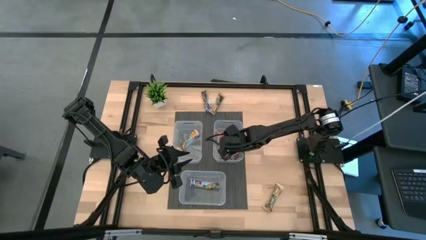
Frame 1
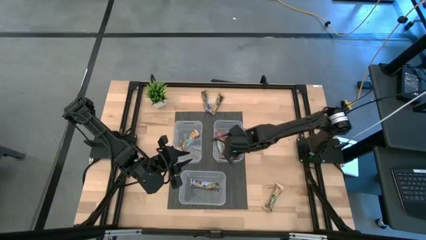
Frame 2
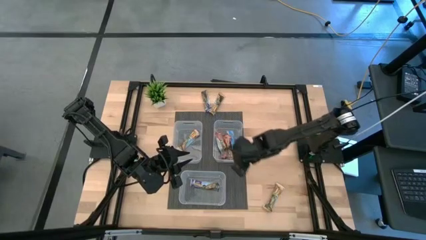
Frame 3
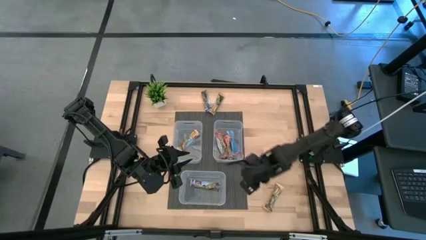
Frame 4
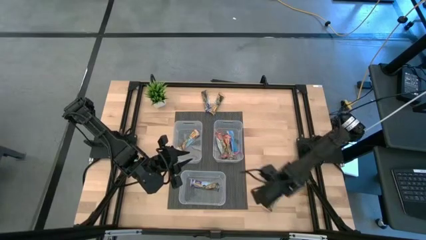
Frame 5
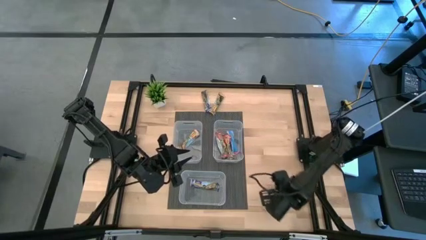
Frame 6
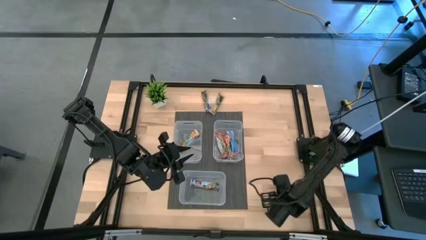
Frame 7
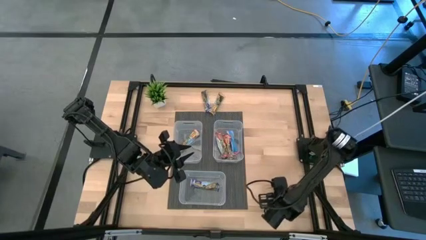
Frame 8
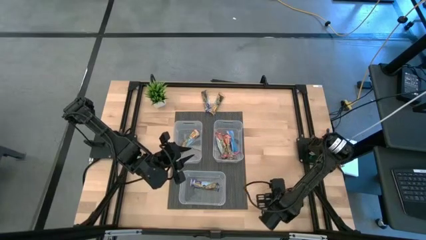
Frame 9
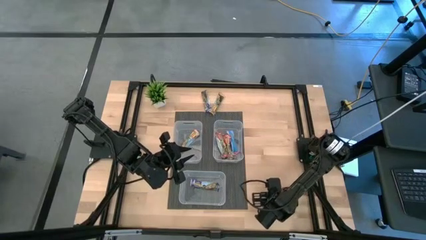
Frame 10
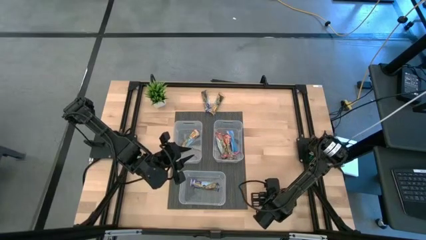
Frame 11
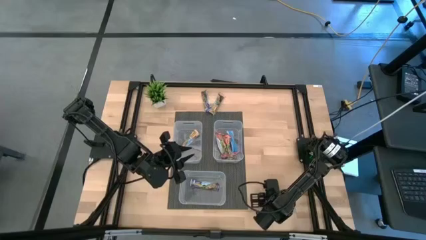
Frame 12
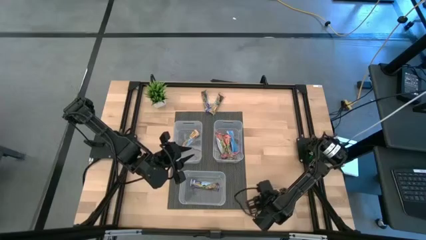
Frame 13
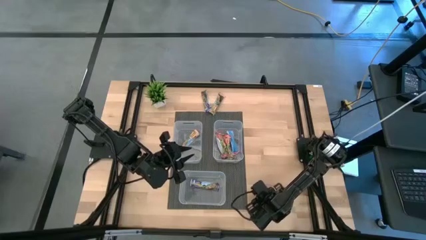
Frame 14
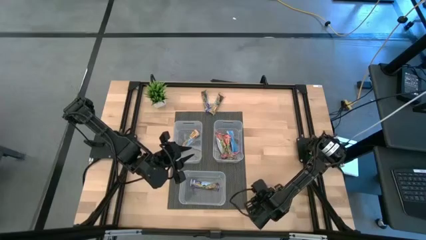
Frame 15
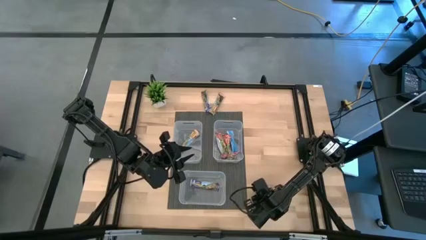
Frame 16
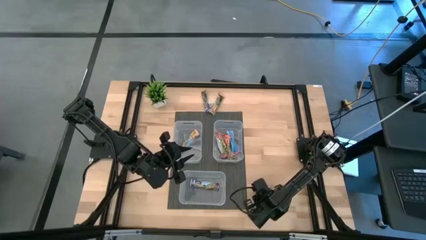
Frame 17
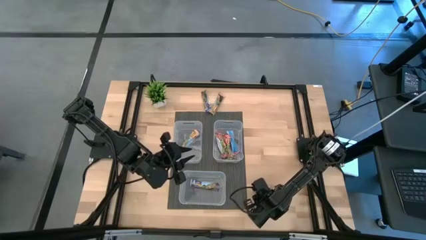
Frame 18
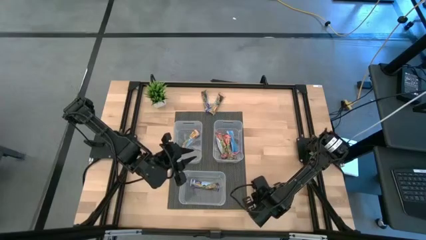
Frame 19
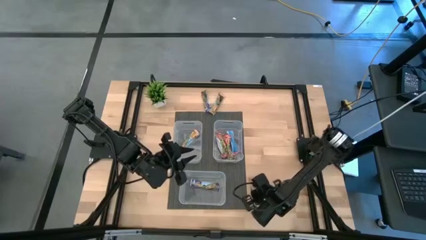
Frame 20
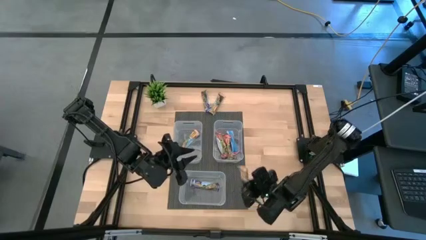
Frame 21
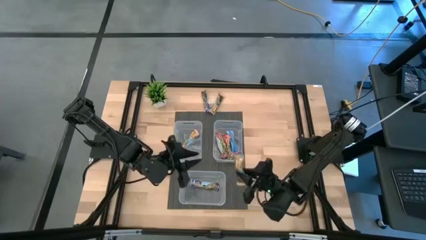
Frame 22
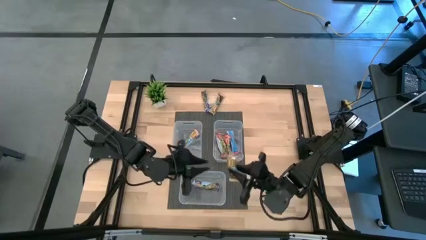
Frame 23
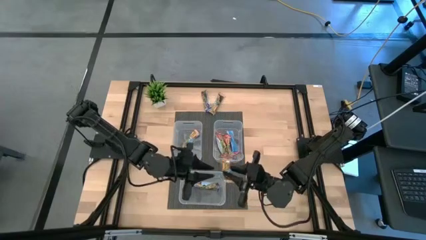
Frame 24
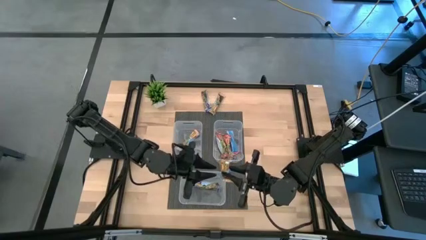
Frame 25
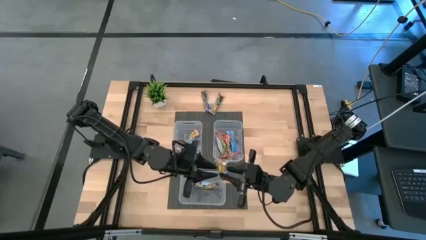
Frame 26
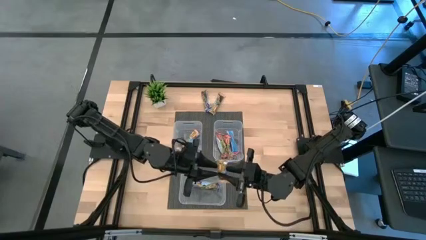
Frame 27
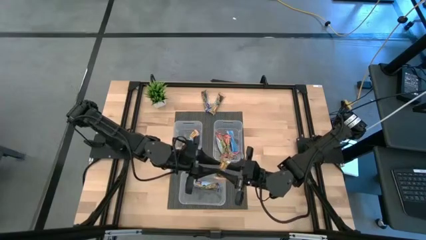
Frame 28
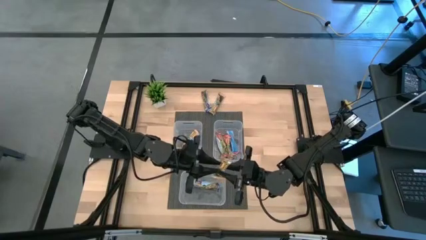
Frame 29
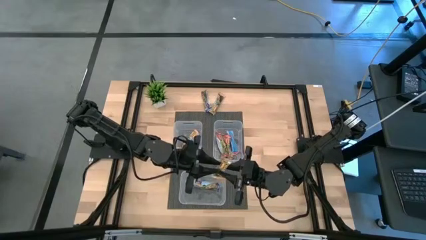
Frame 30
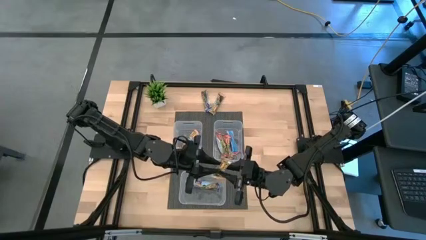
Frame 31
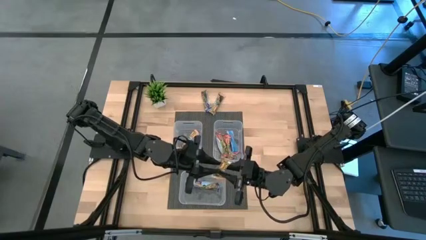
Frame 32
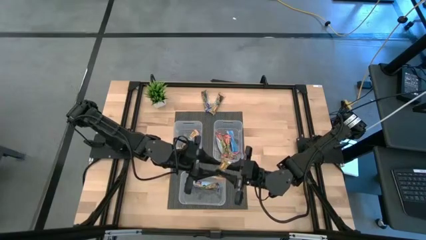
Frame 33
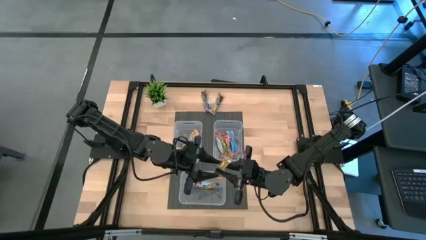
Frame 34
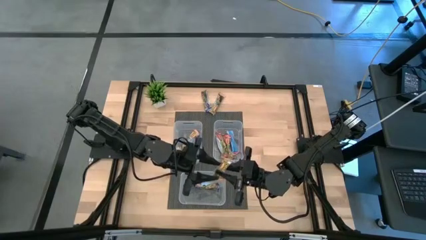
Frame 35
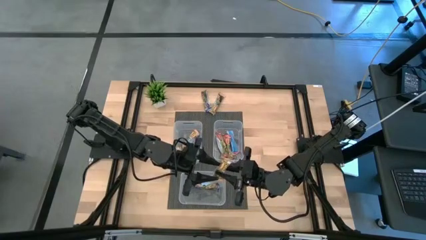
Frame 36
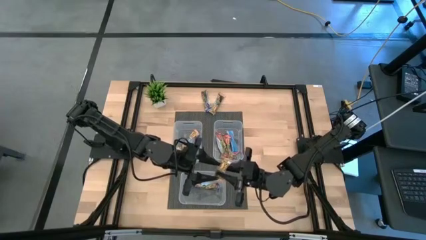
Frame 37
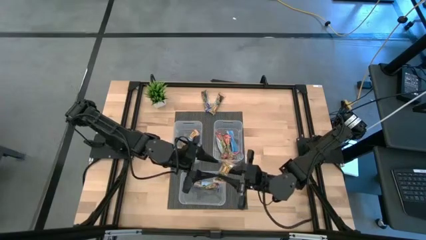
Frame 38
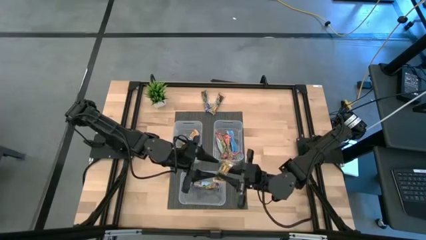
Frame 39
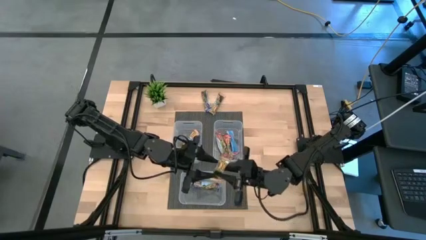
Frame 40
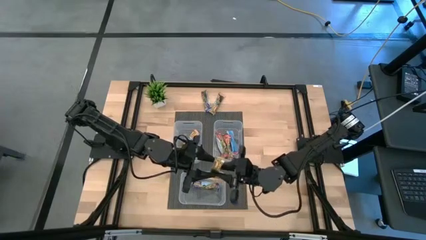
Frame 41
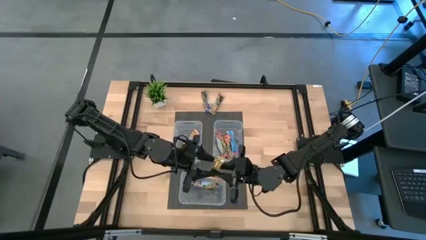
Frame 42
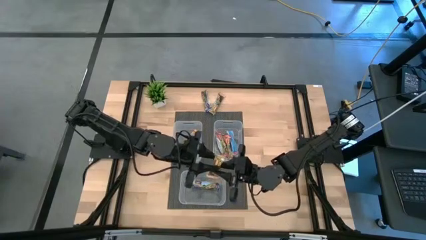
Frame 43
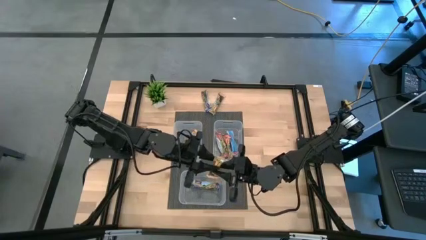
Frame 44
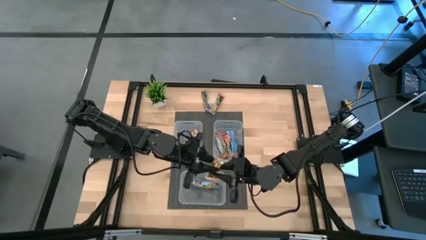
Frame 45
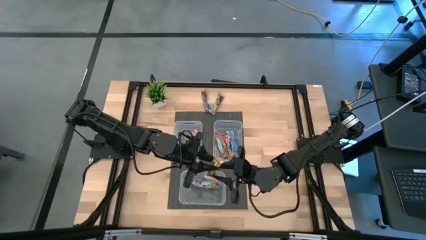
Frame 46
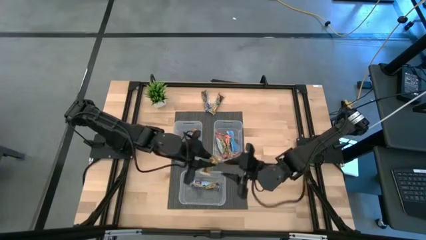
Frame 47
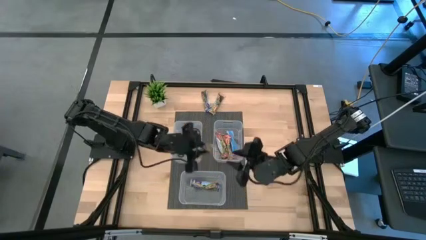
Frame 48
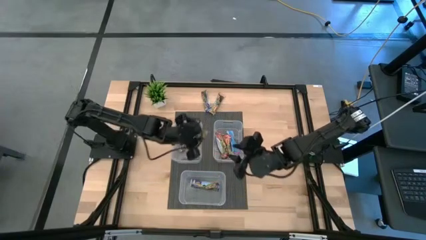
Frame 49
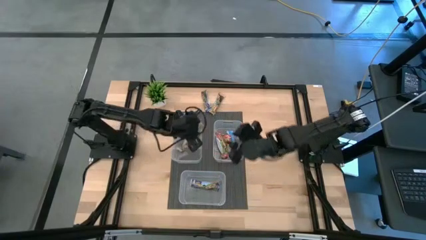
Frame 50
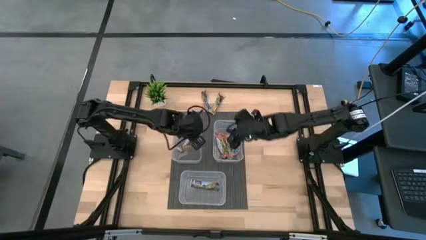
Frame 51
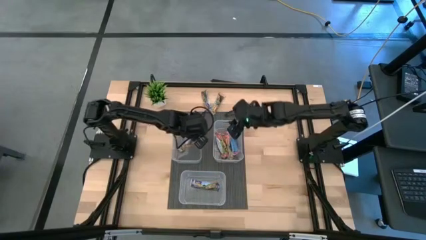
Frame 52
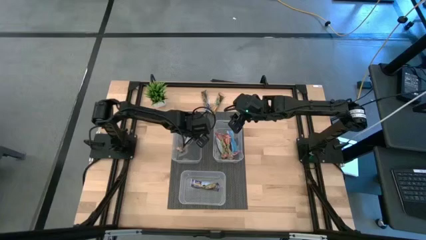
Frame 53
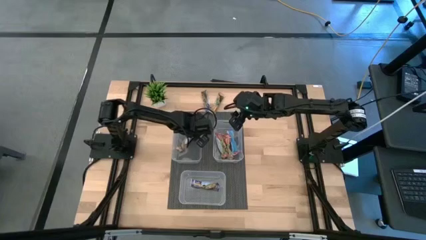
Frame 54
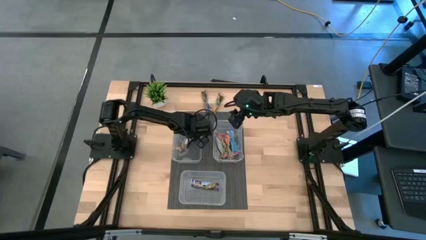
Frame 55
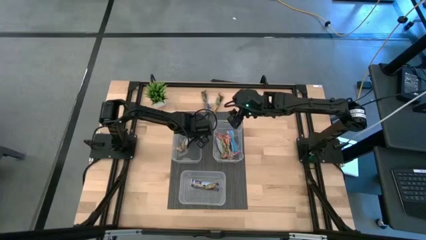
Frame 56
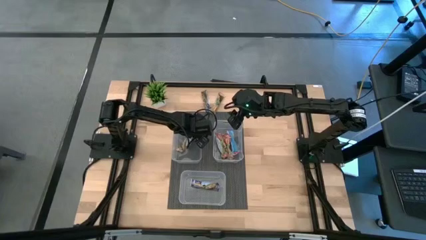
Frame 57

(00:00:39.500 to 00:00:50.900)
Task: Pick and place Granola Bars by type
Put the bottom yellow granola bar into the top left transparent bin

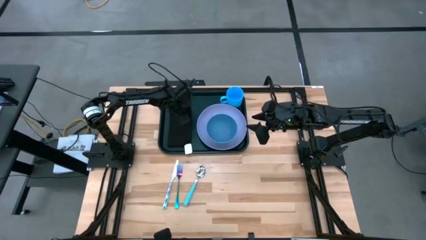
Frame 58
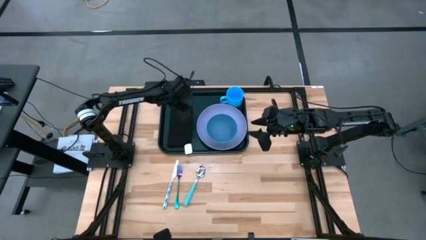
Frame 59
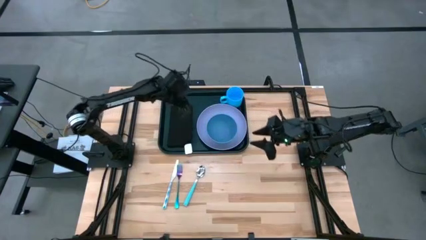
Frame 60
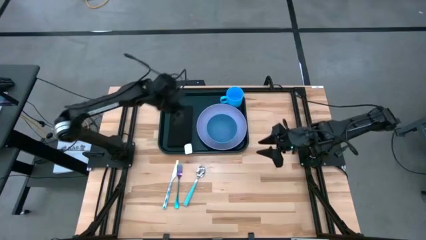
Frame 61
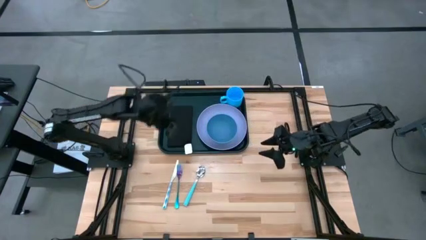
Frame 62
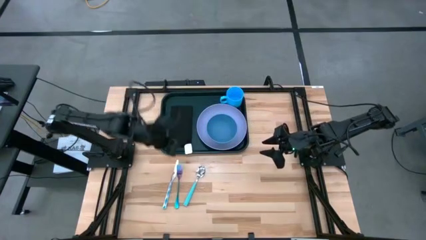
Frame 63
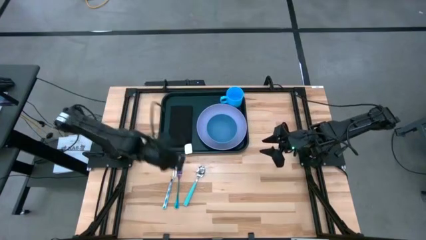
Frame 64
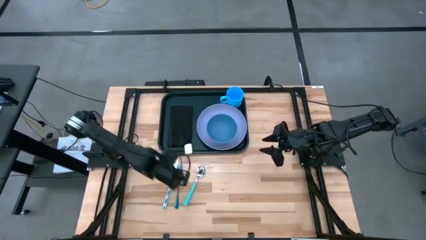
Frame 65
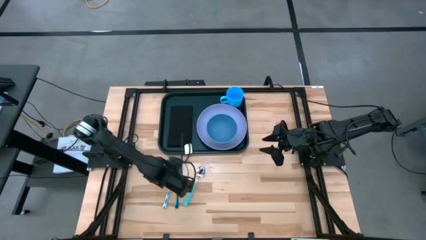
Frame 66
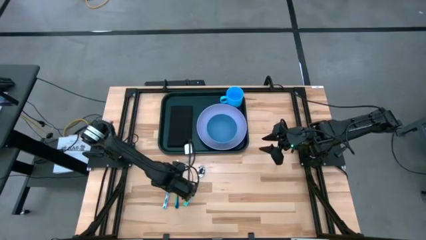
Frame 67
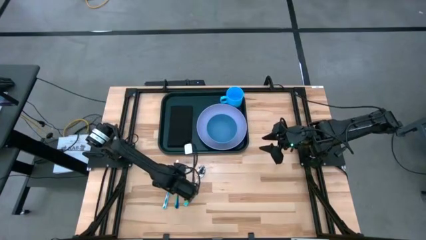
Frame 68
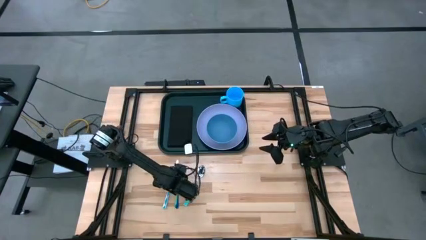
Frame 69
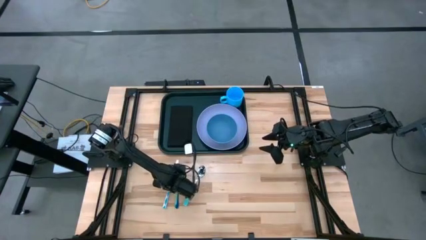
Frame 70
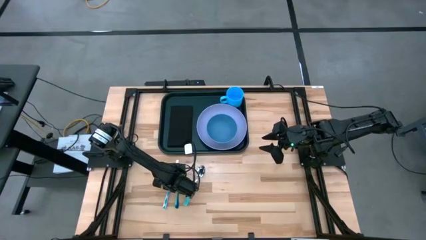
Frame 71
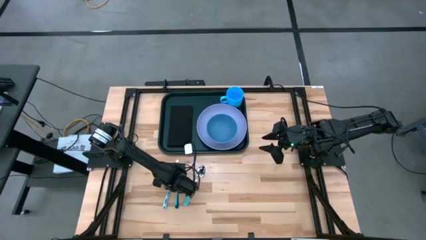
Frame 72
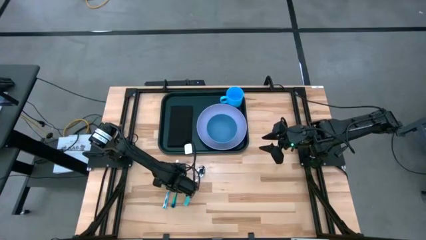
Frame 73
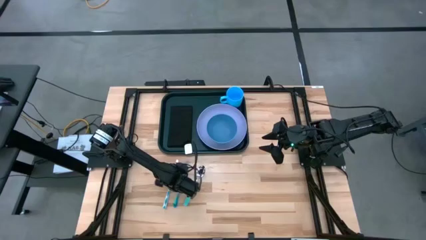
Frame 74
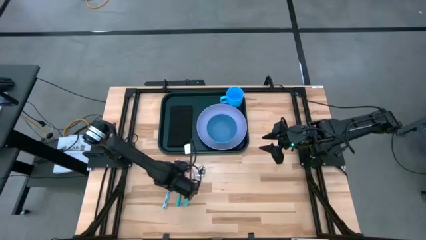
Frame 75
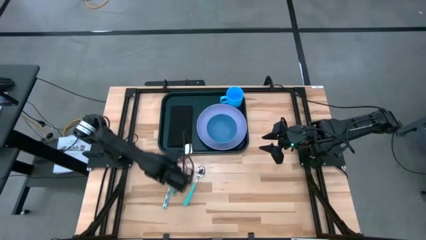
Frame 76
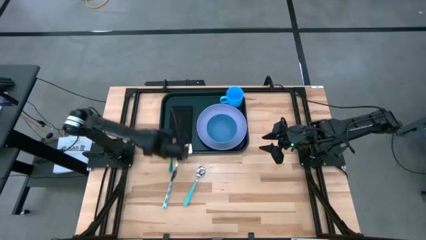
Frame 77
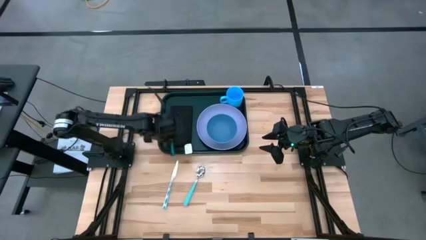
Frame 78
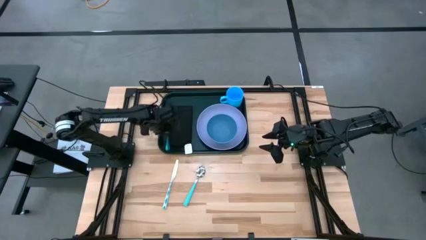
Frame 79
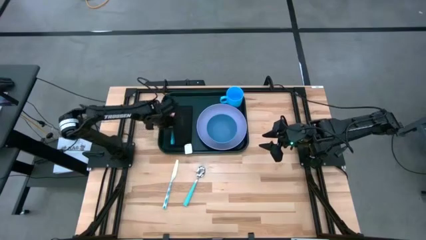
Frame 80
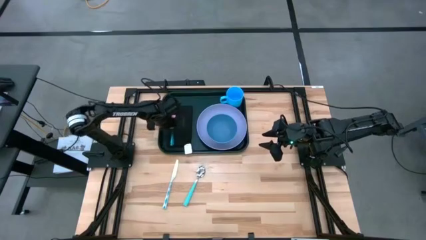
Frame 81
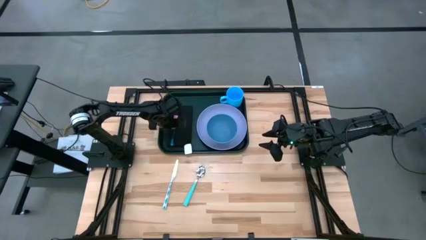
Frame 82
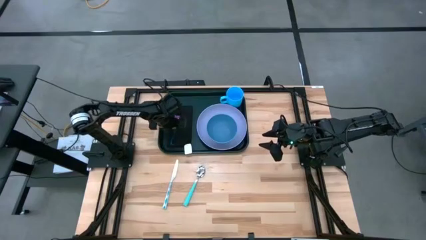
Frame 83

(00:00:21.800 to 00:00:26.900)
Task: Set up tray
Put the blue fork on top of the black napkin
